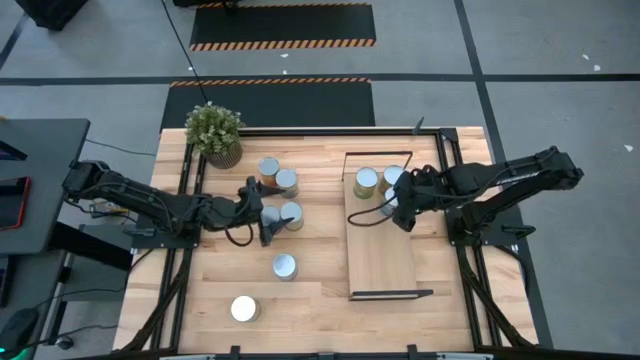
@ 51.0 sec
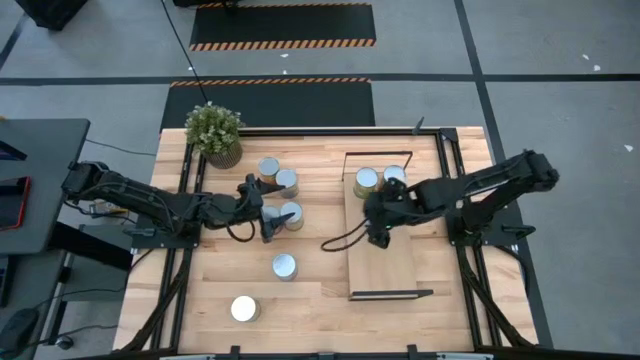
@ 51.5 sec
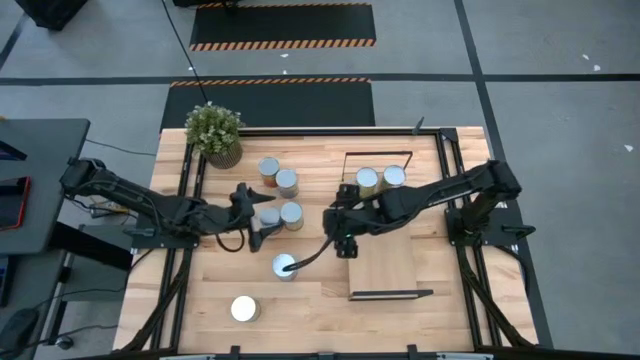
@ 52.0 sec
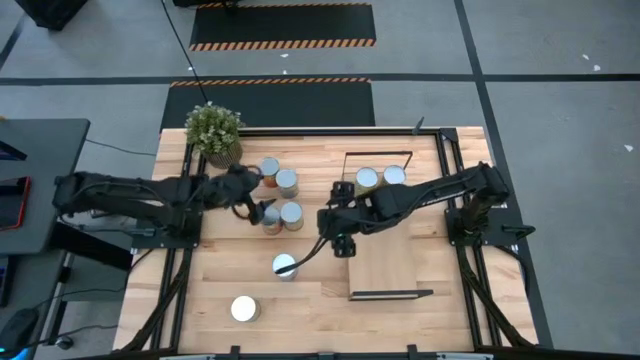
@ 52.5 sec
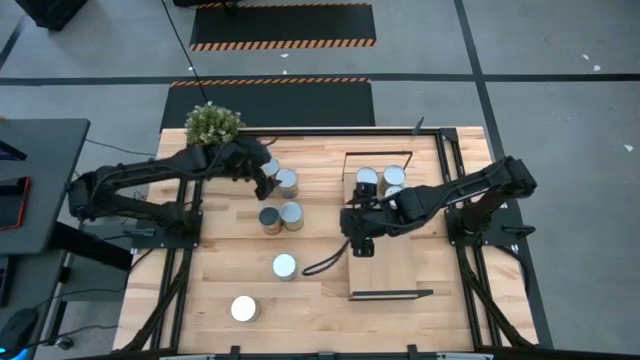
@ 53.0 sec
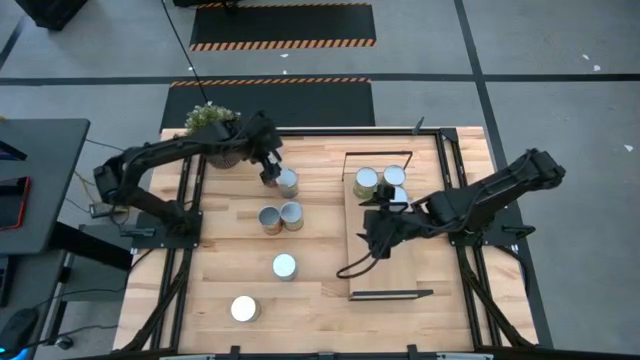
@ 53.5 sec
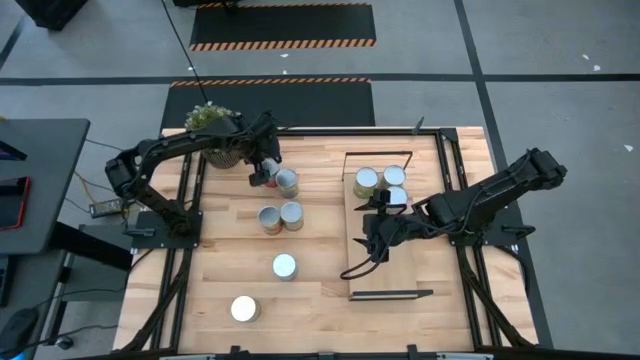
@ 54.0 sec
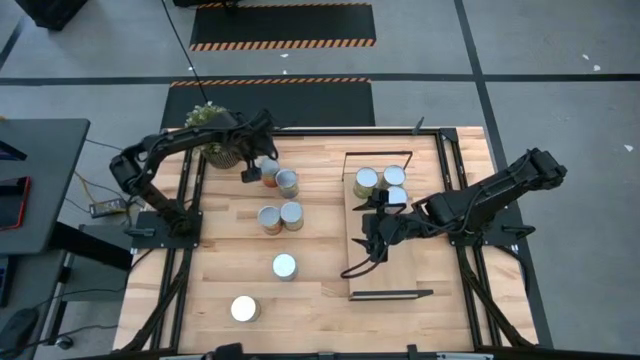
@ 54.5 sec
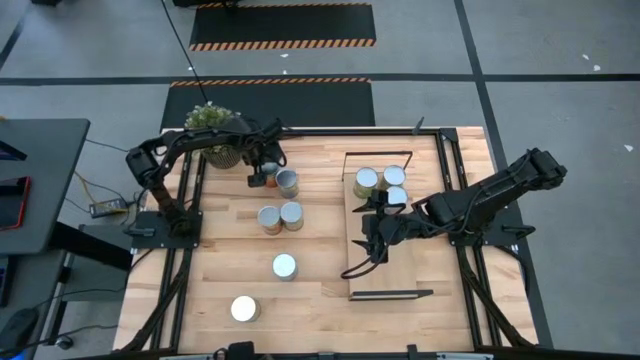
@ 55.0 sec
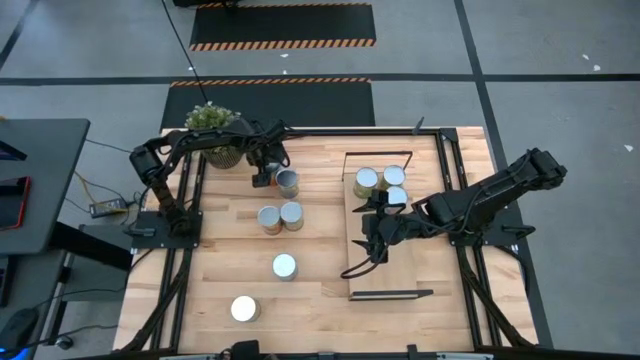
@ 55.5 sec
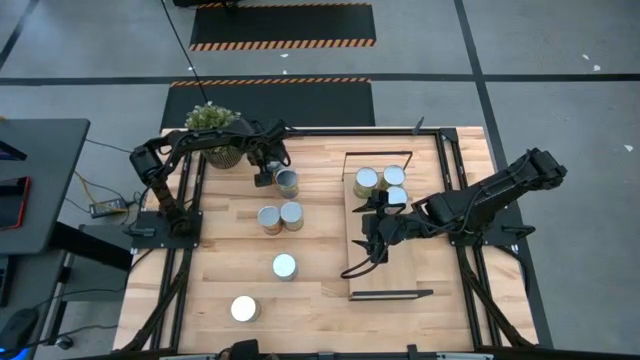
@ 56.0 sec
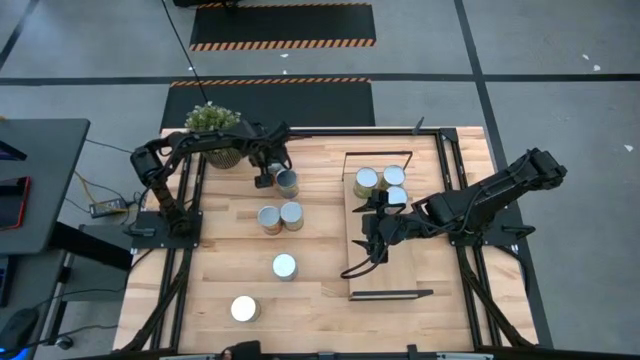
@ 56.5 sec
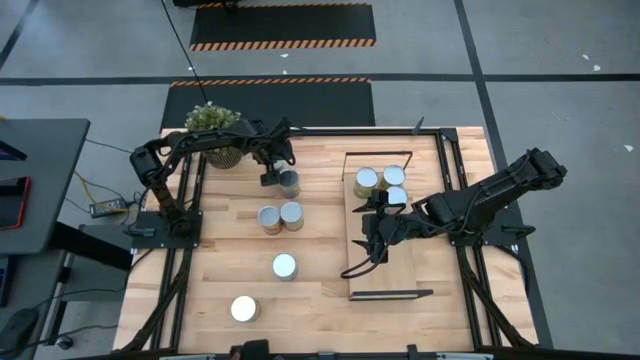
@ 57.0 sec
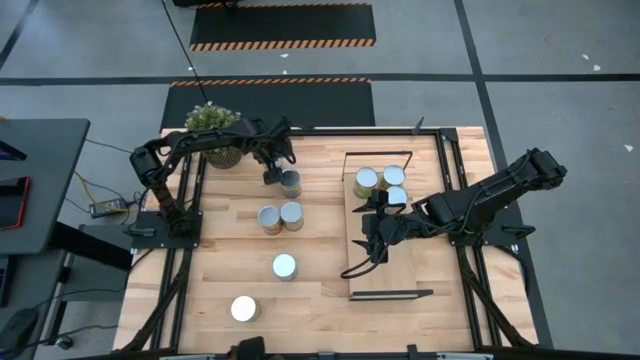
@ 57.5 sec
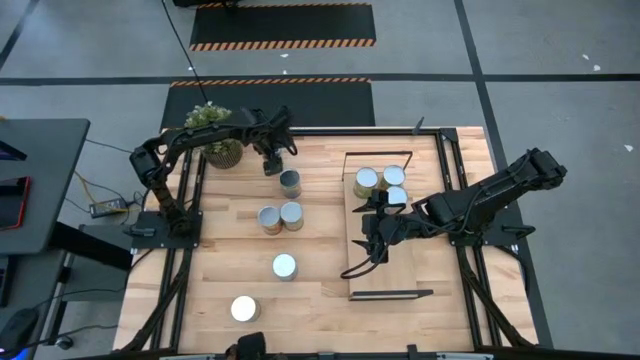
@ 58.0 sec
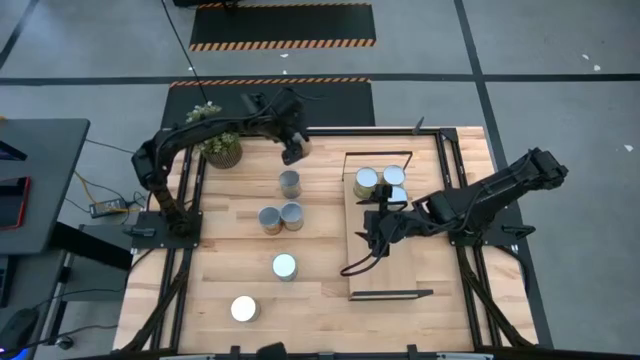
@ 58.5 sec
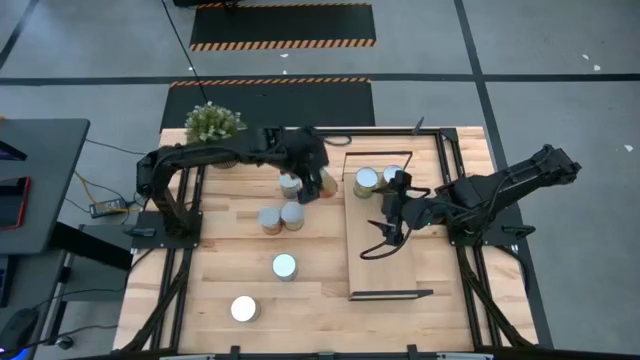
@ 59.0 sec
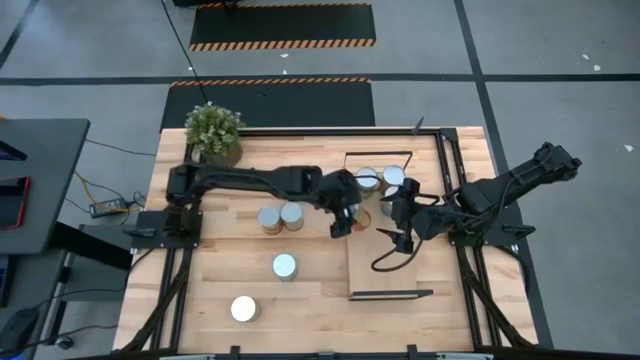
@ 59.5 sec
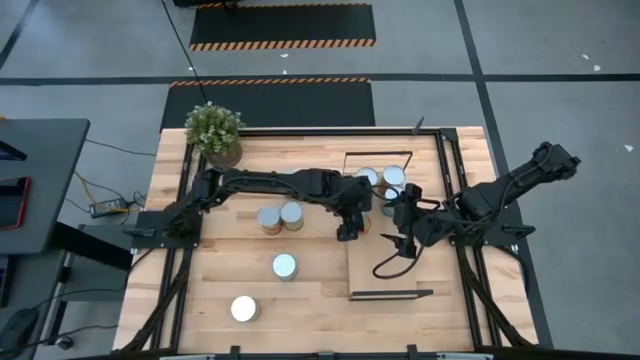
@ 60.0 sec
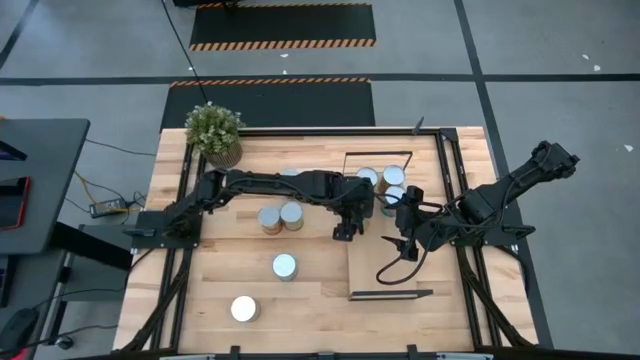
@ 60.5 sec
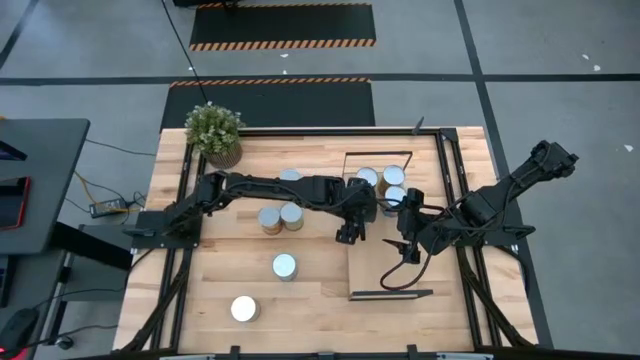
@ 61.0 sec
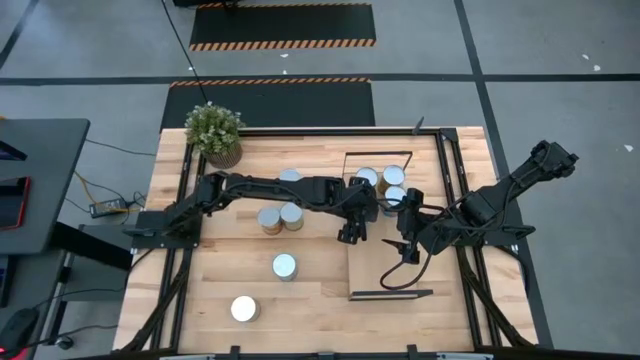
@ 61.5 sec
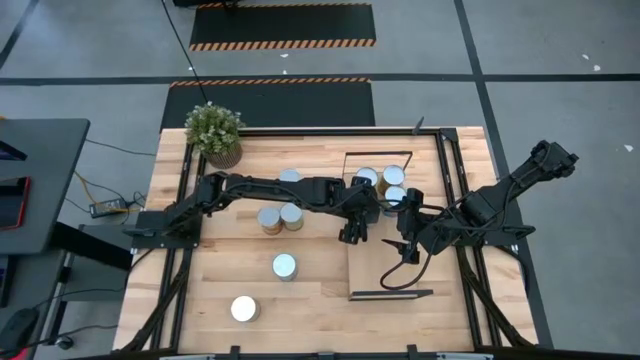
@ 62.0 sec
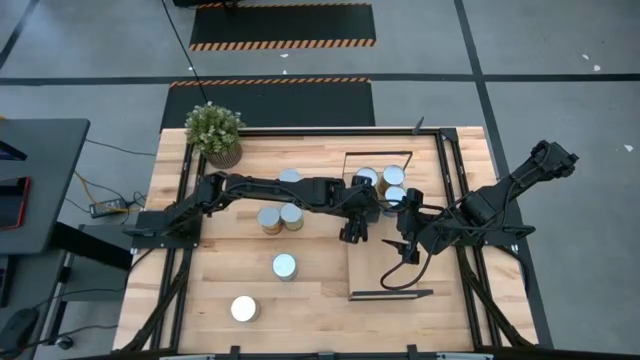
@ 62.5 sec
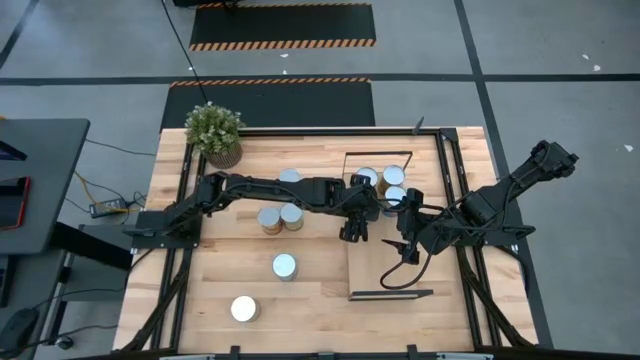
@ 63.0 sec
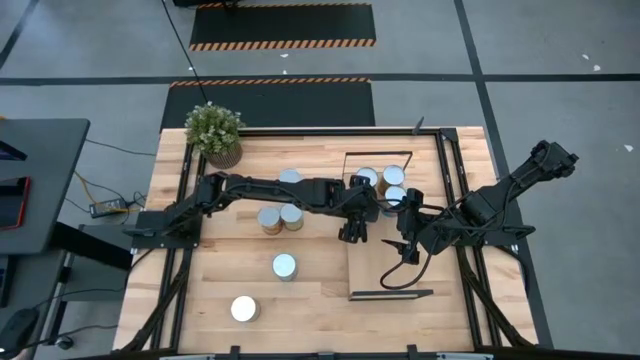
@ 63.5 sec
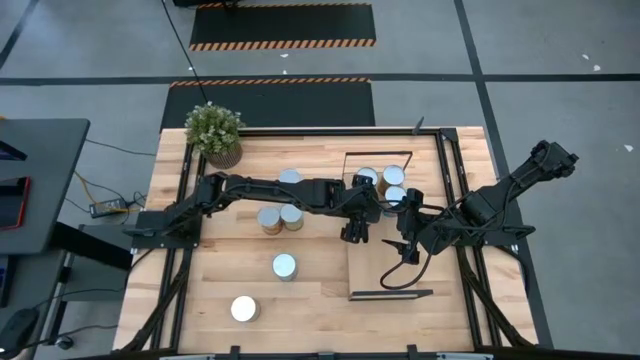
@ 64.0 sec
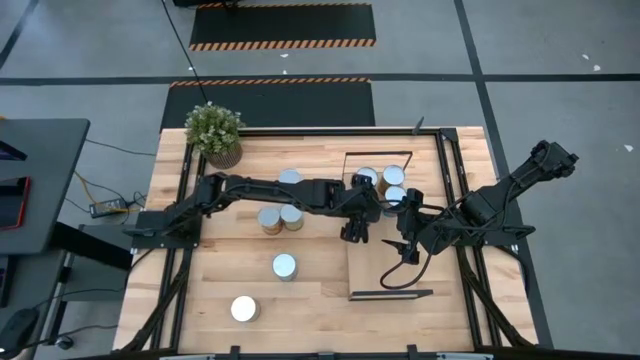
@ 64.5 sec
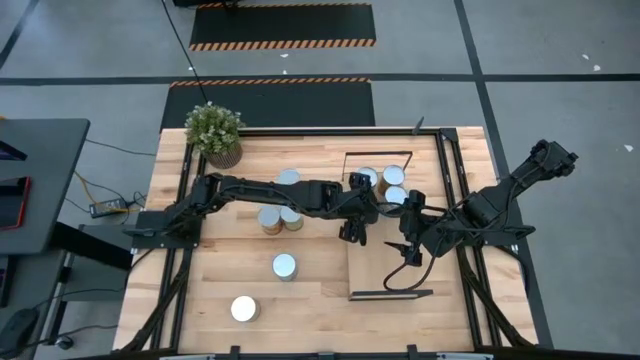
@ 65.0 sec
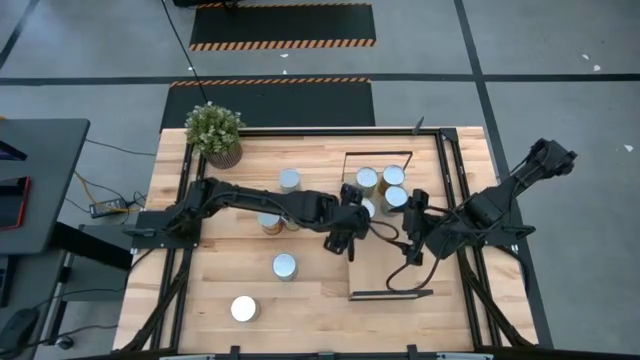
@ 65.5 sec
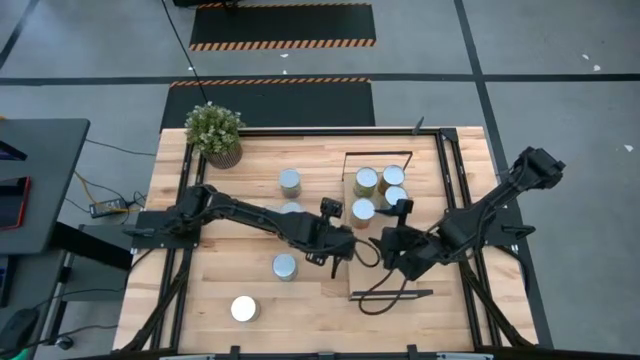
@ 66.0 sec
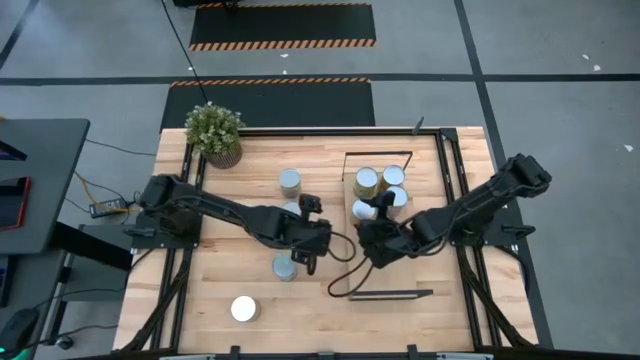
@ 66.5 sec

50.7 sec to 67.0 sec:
Task: Pick and place cans onto a shelf
Put the canned pineapple on the shelf

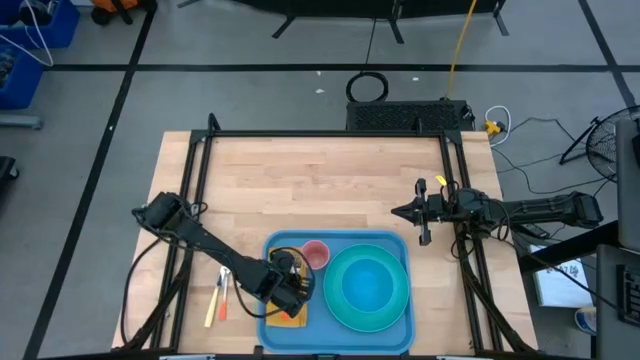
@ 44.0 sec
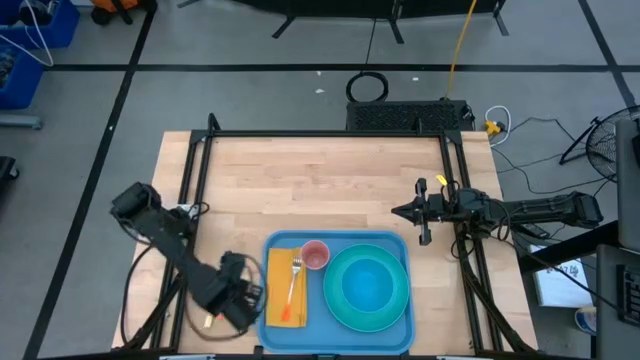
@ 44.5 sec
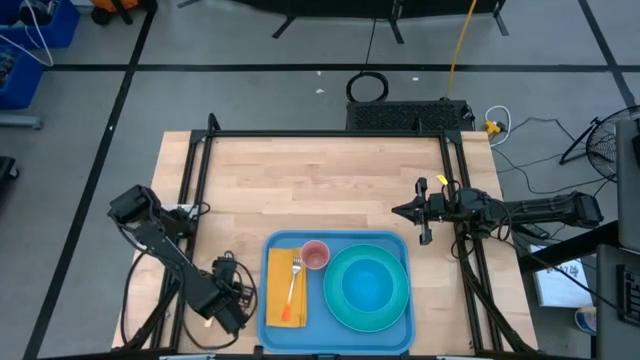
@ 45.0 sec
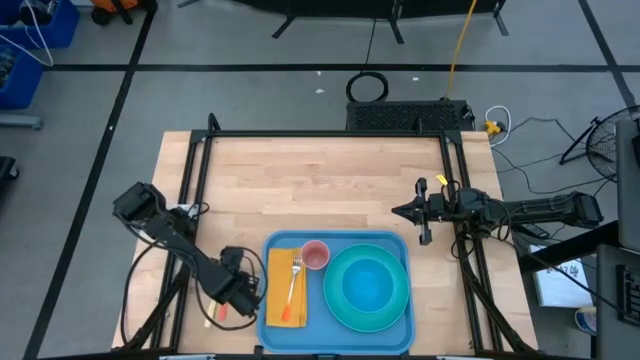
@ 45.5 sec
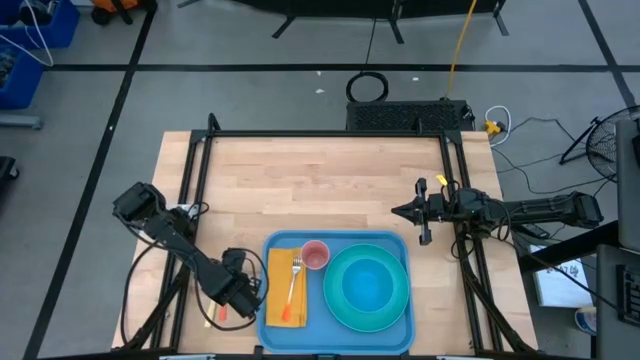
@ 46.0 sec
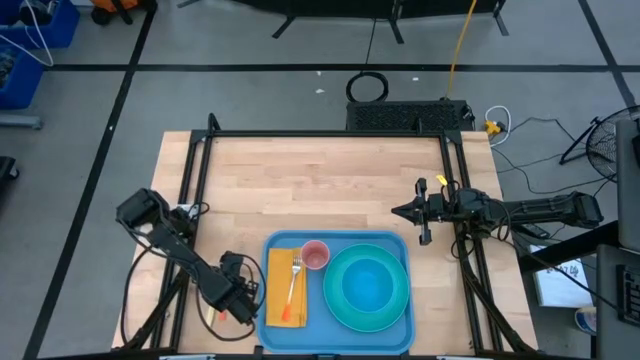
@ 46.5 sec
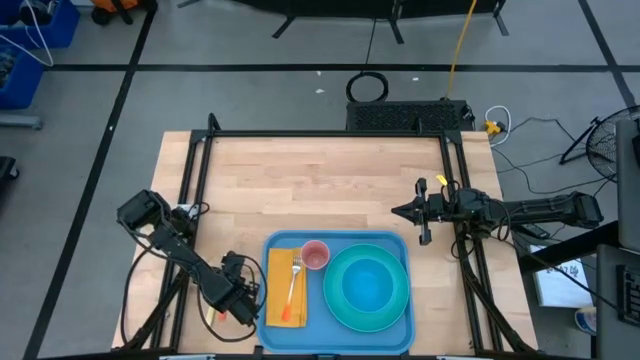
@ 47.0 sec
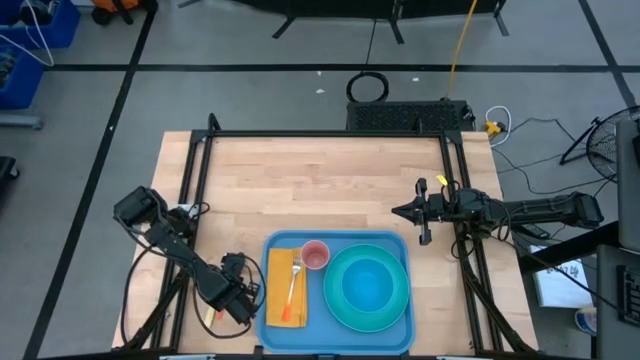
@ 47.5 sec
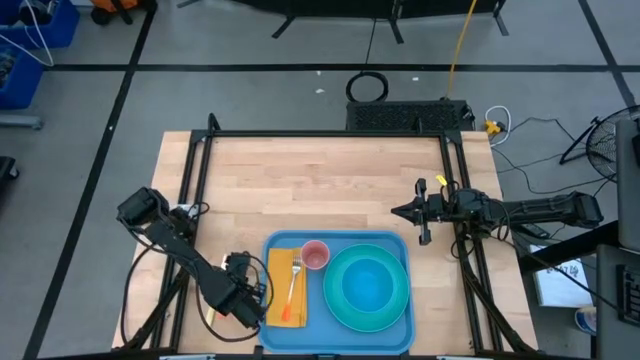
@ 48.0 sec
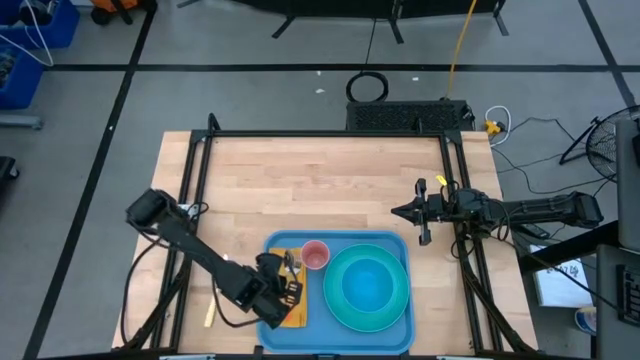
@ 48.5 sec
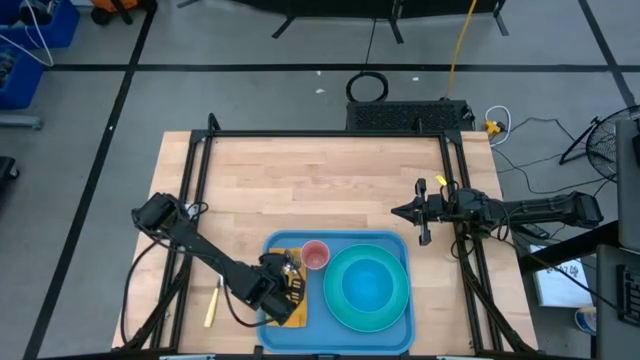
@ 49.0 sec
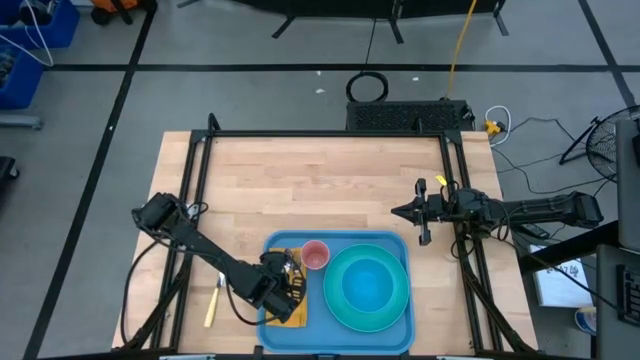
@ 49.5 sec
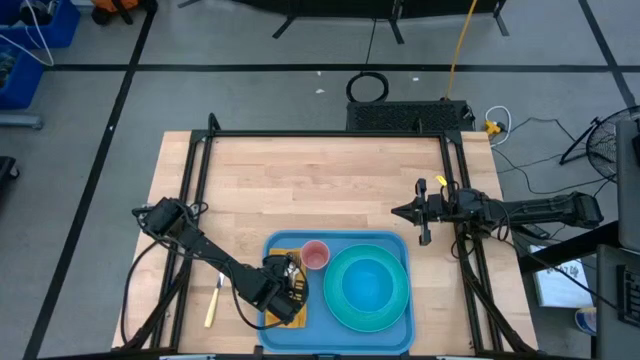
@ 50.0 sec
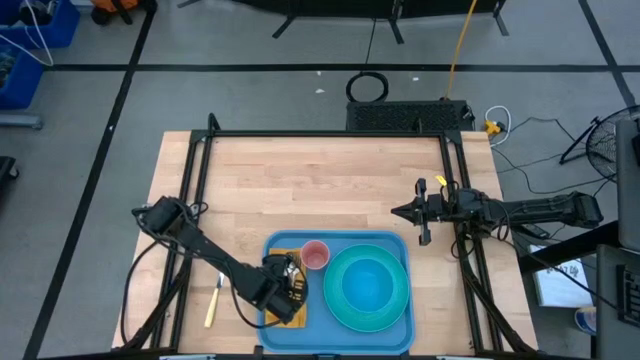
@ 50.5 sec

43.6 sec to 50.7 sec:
Task: Set up tray
Put the orange spoon to the left of the orange fork on the yellow table napkin on the blue tray
